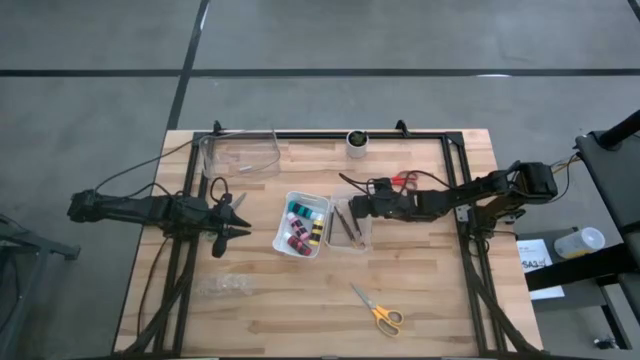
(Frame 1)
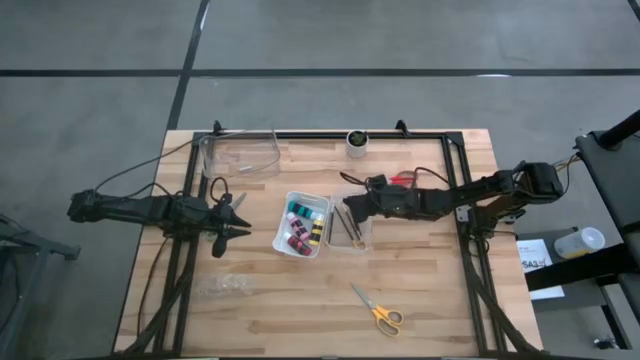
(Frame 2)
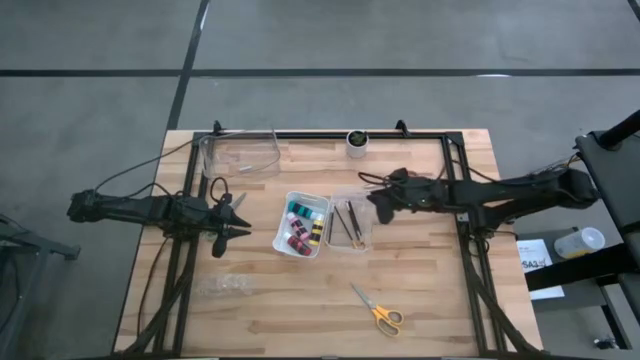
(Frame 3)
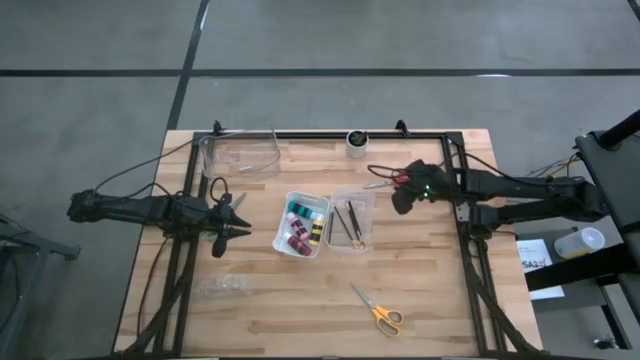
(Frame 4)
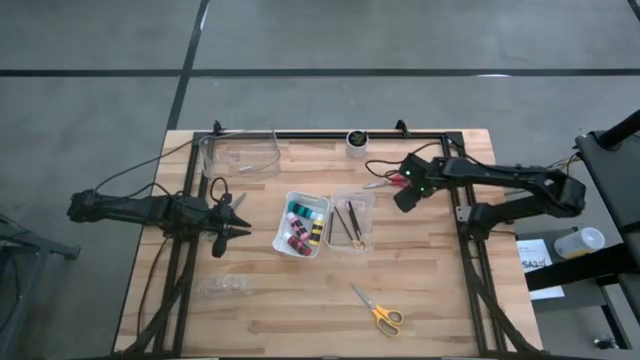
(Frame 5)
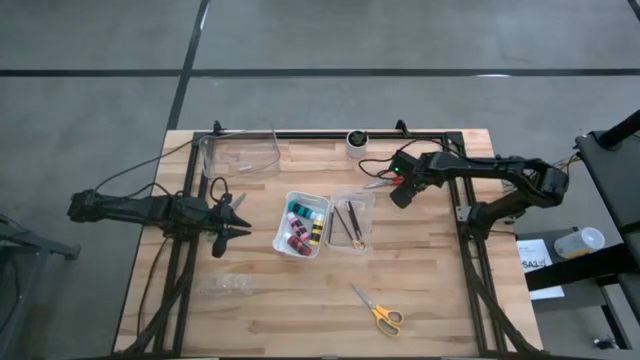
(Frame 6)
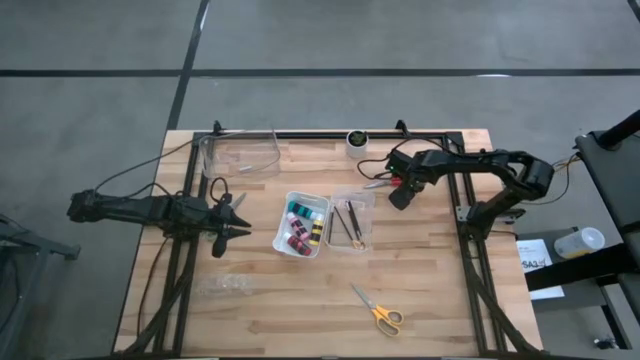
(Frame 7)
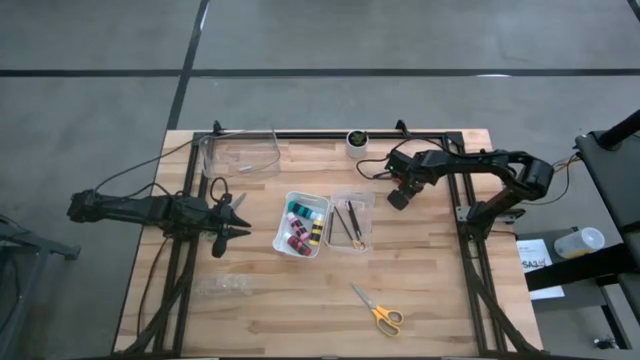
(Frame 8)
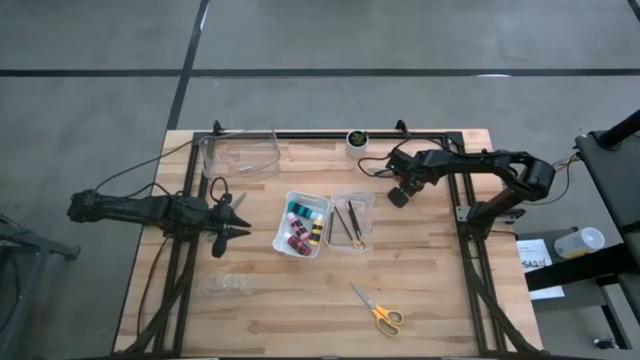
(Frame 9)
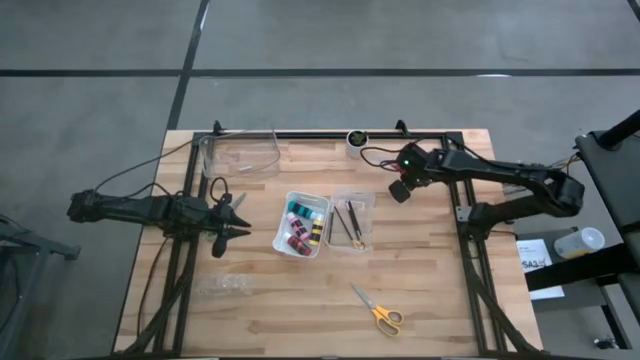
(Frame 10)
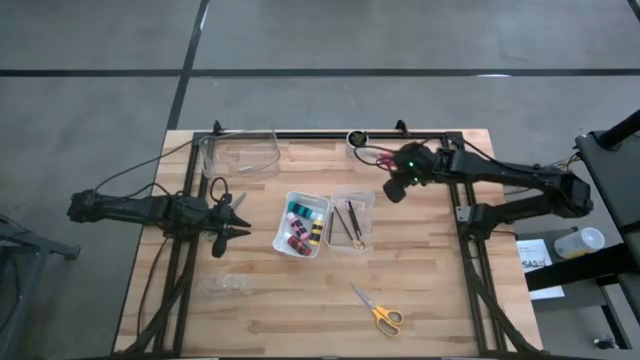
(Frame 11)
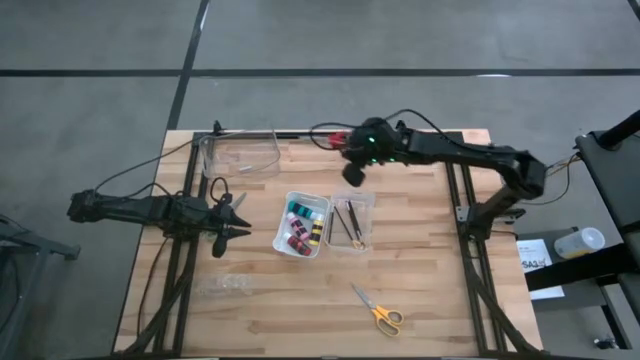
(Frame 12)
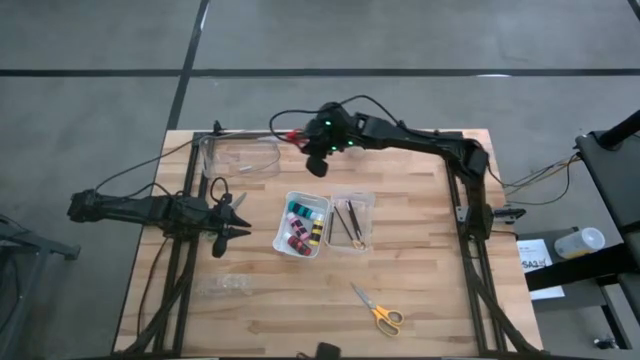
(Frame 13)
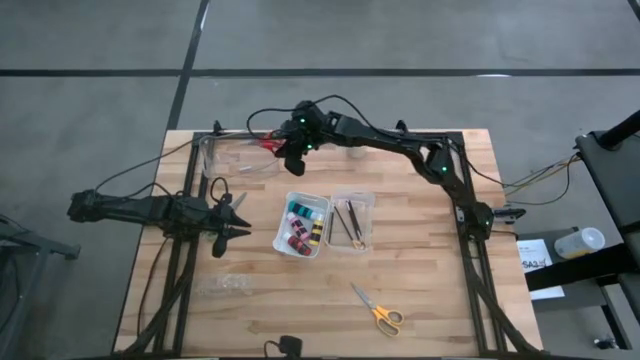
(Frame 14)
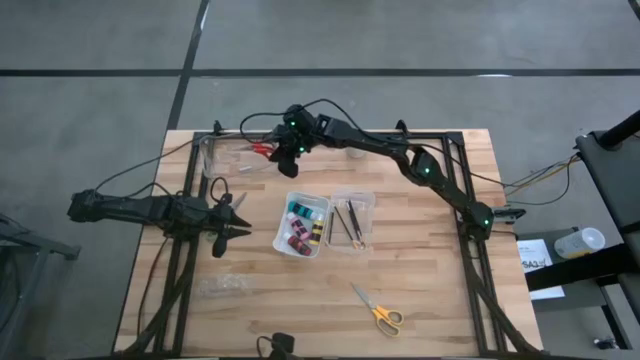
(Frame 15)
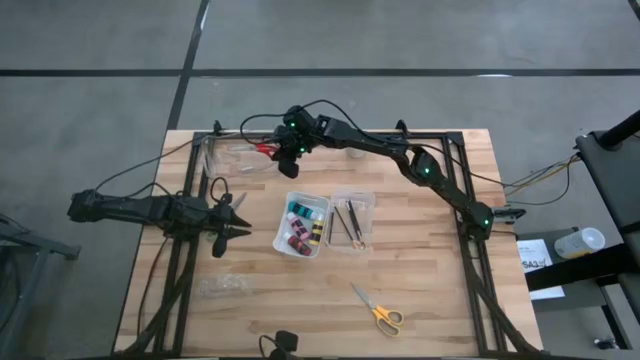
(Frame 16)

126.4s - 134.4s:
Task: Pick & Place Paint Supplies
Put the red scissors into the top transparent bin

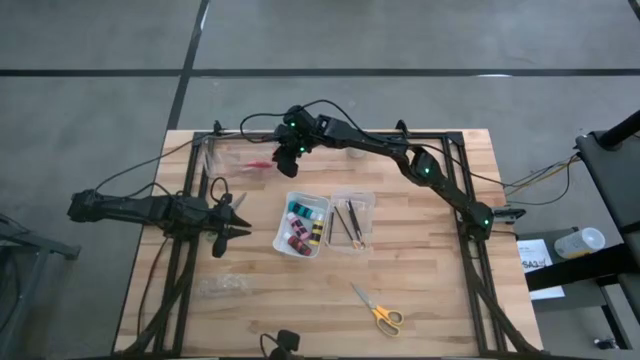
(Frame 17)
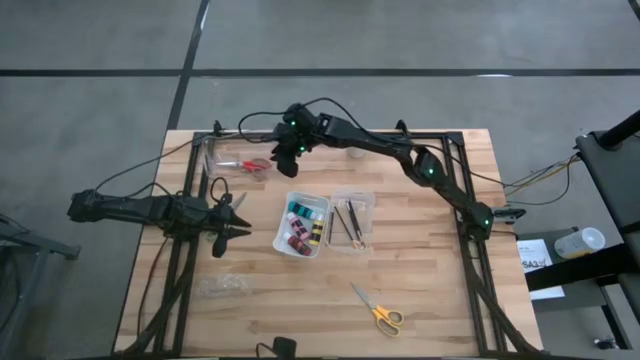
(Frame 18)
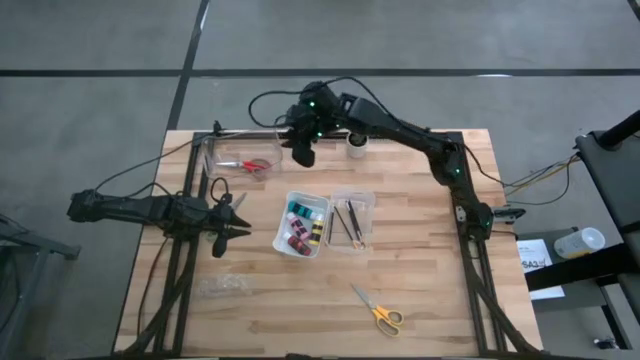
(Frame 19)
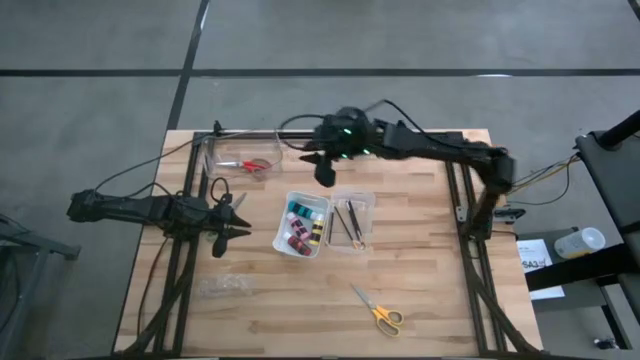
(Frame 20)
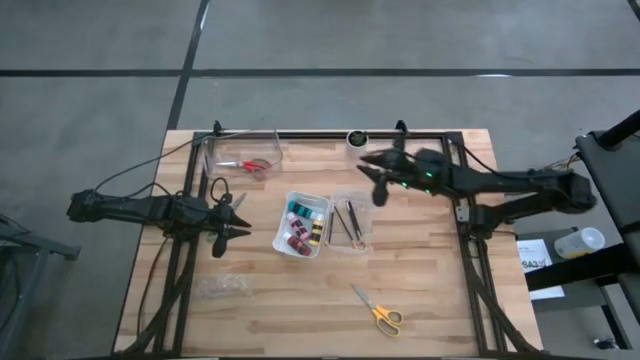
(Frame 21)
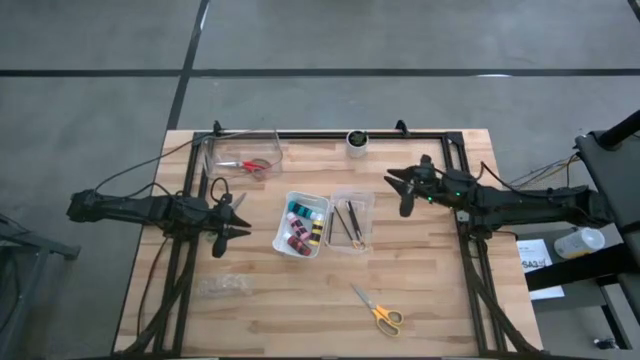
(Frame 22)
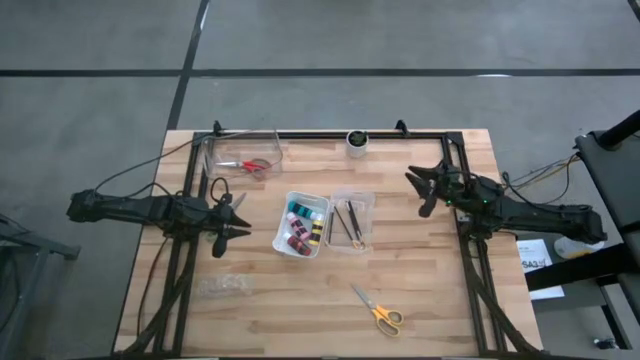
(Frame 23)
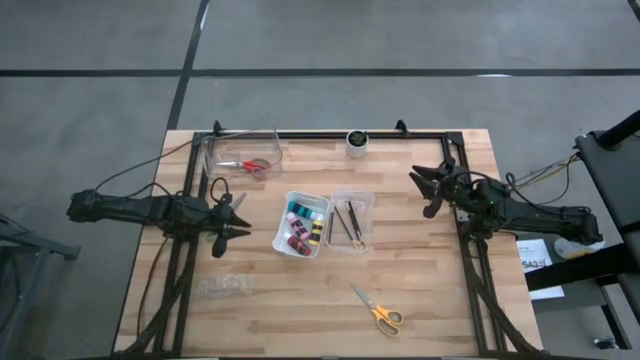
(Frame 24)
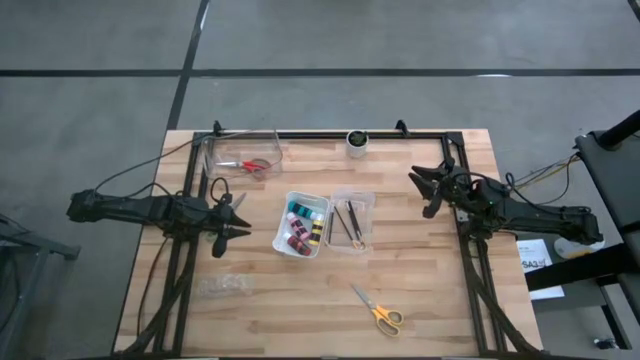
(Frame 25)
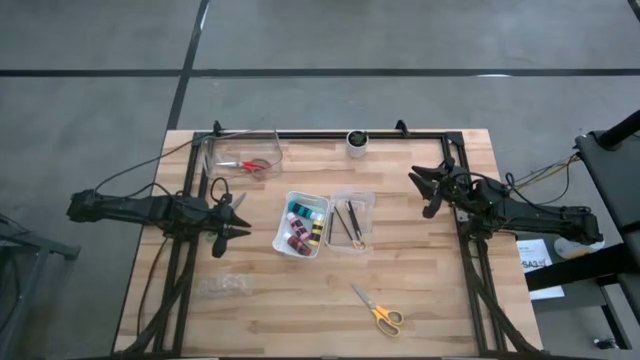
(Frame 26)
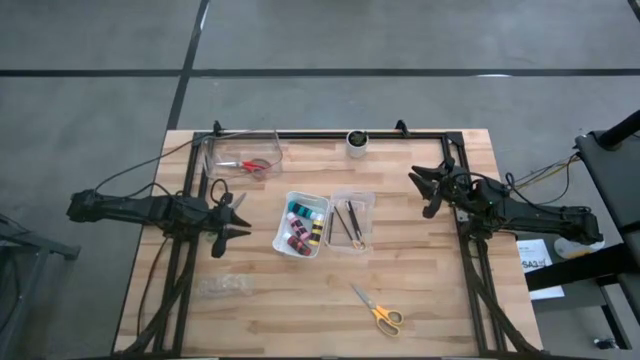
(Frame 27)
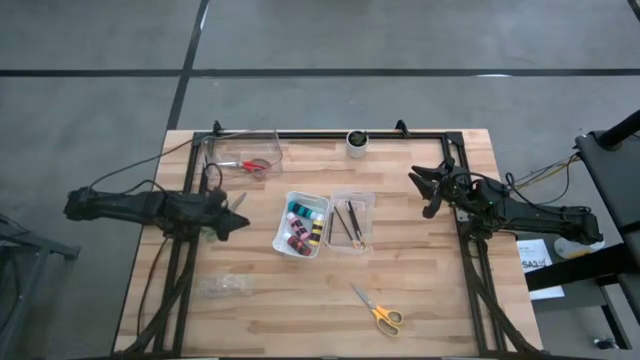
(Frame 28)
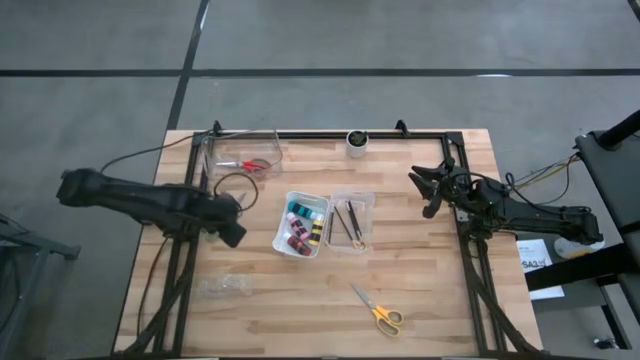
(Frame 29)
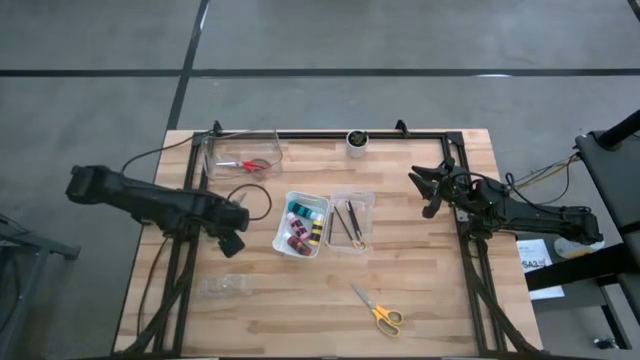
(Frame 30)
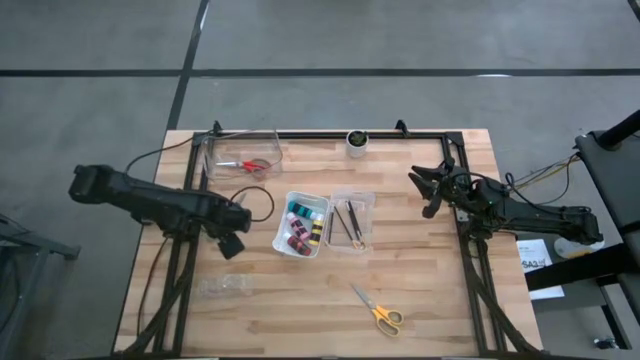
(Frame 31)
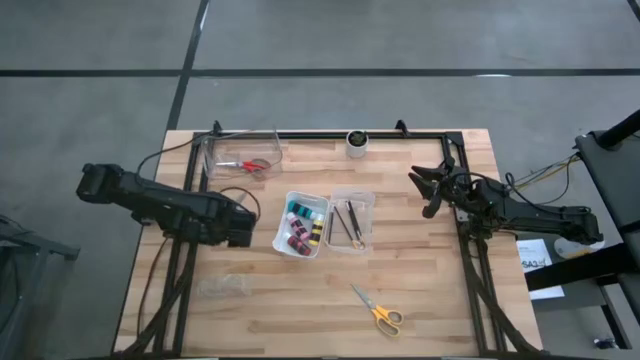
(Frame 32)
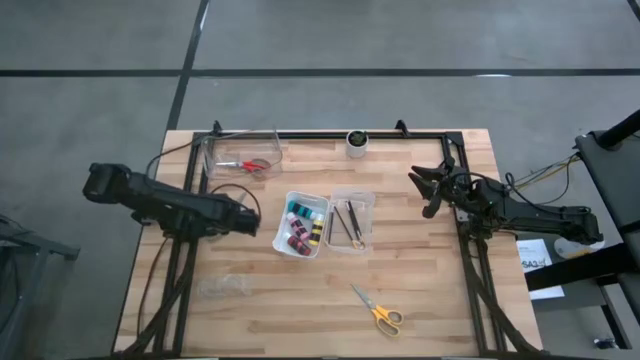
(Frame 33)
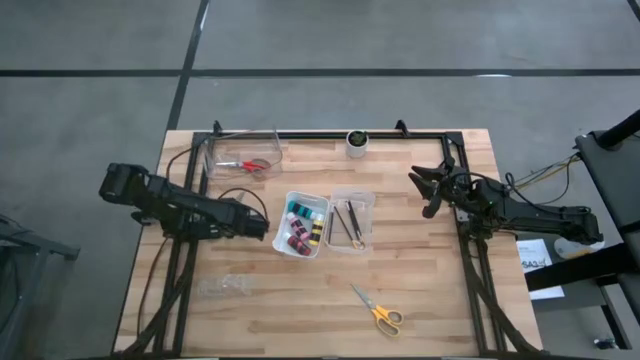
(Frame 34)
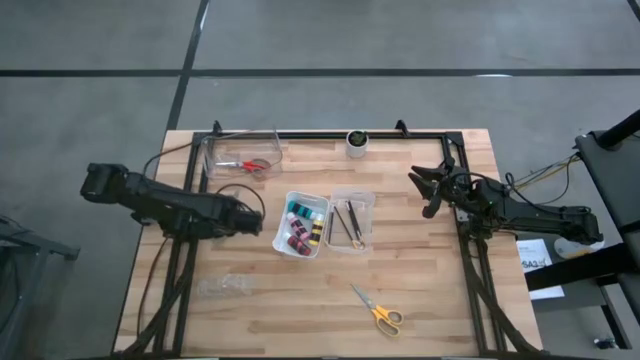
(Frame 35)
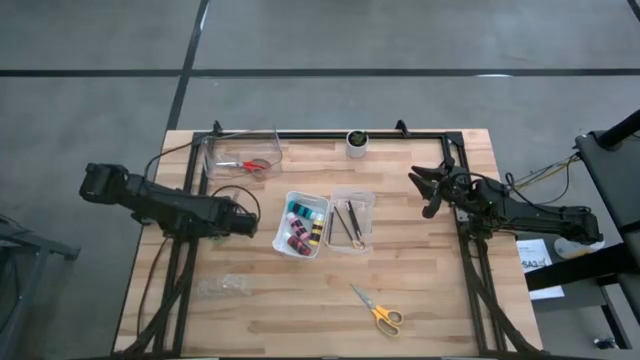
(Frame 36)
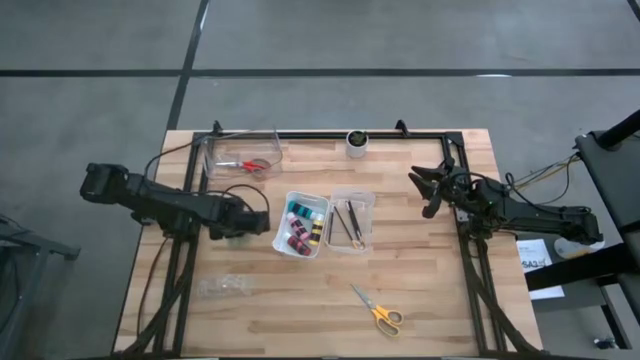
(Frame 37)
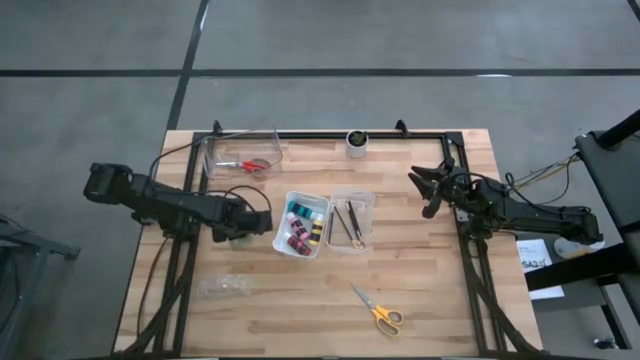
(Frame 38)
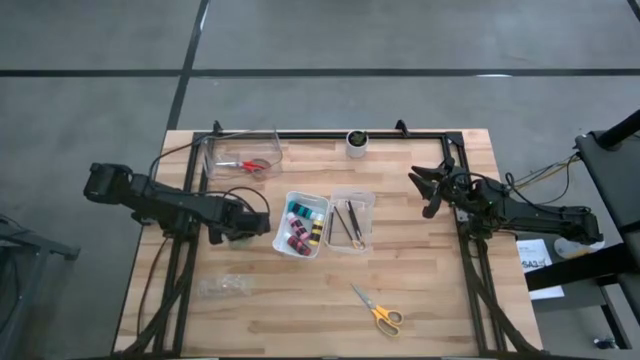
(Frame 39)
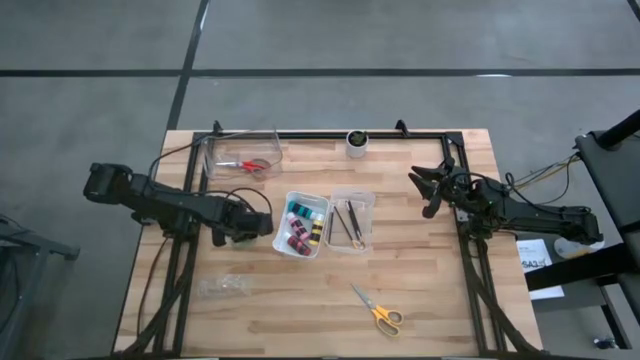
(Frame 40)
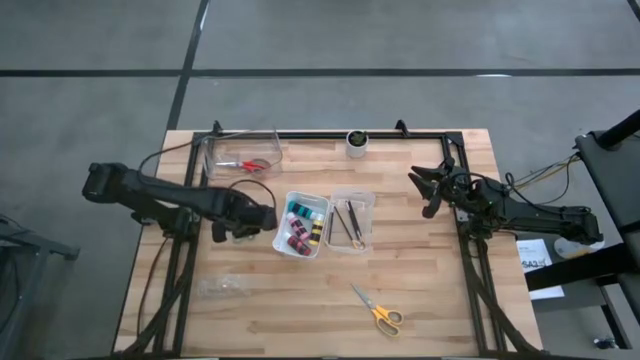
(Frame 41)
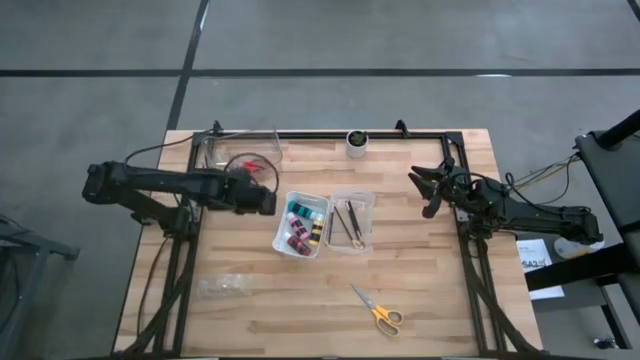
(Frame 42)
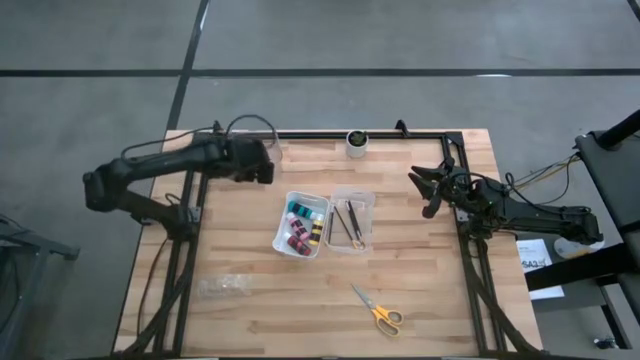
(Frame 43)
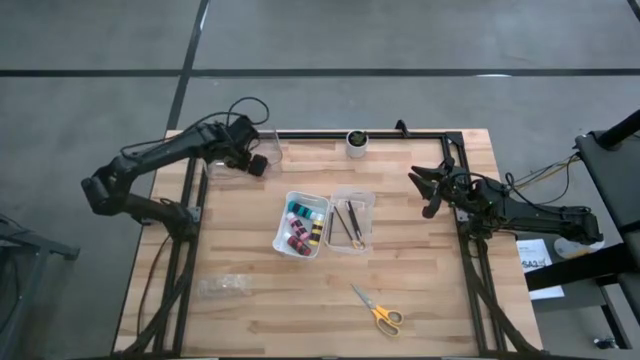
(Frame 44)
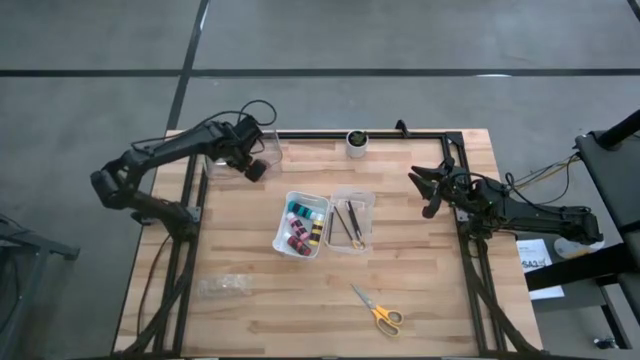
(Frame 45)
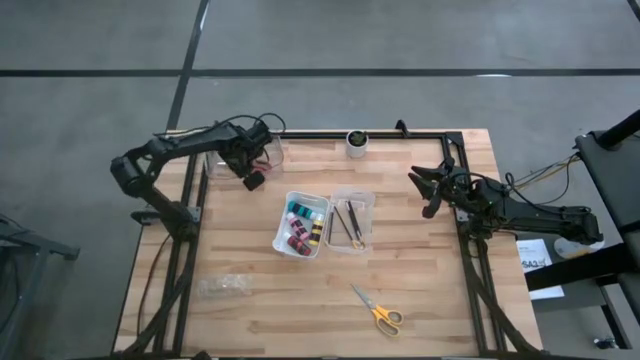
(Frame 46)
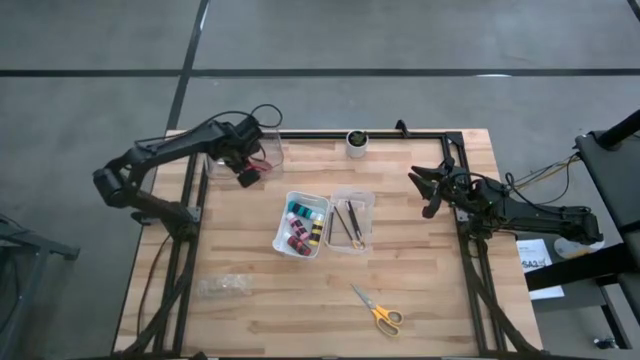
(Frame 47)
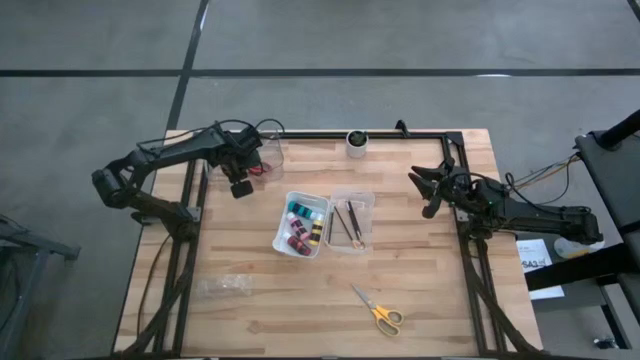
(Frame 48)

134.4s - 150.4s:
Put the green scissors into the top transparent bin
